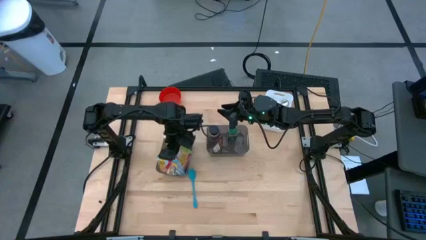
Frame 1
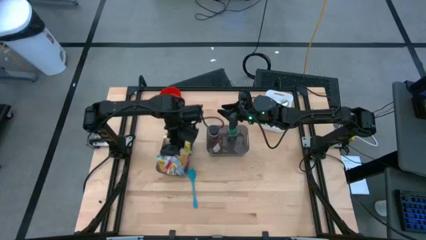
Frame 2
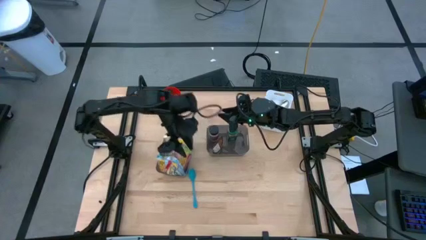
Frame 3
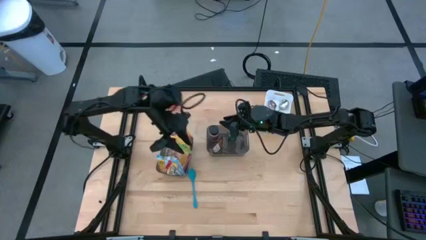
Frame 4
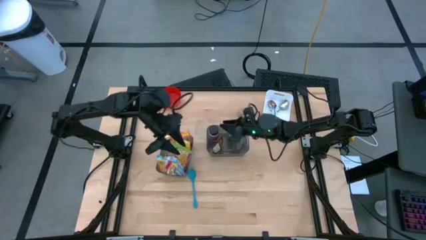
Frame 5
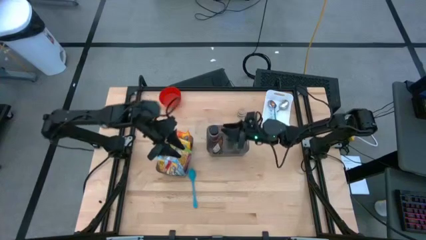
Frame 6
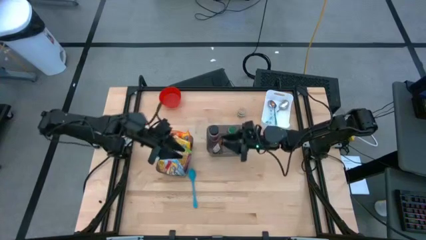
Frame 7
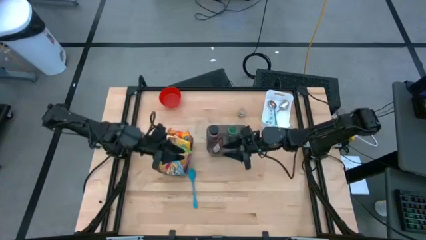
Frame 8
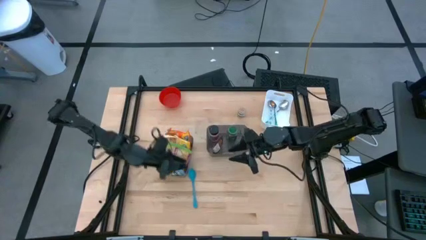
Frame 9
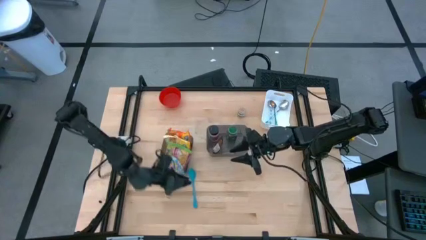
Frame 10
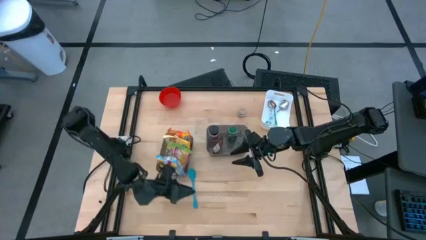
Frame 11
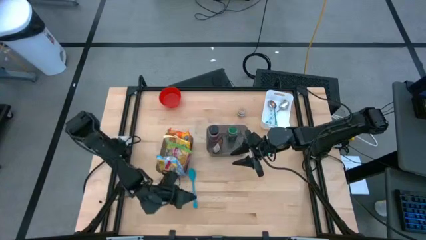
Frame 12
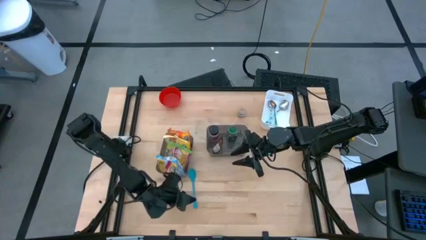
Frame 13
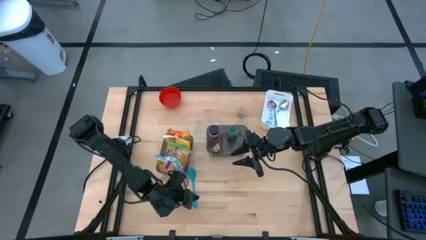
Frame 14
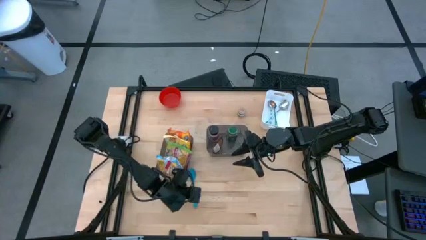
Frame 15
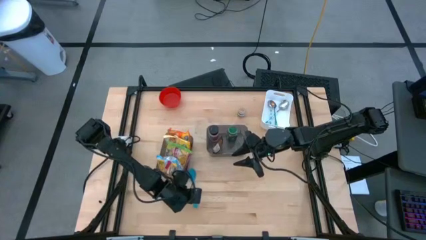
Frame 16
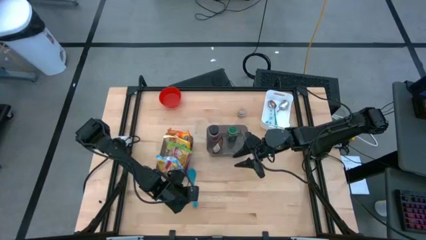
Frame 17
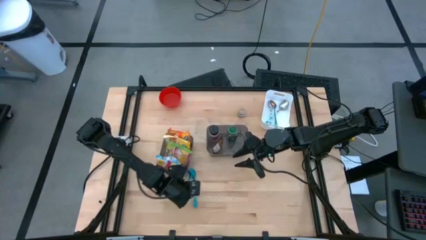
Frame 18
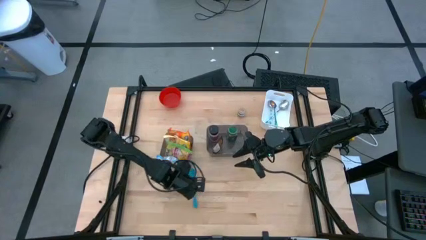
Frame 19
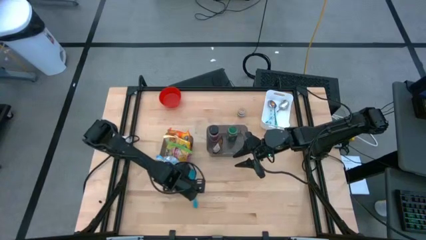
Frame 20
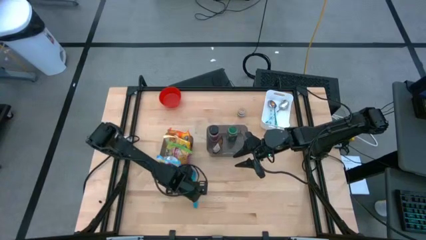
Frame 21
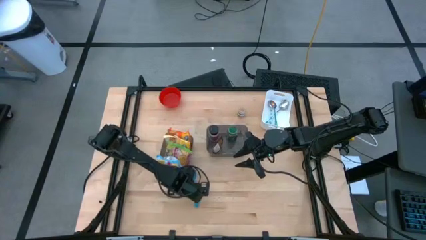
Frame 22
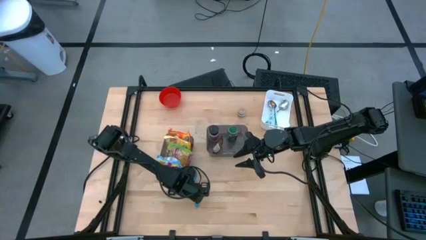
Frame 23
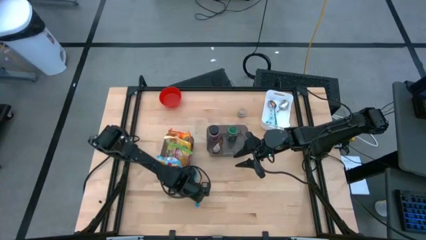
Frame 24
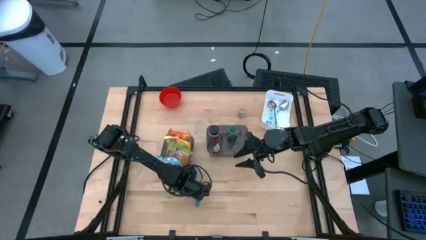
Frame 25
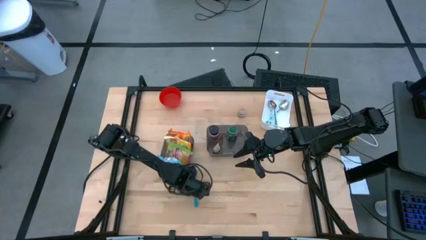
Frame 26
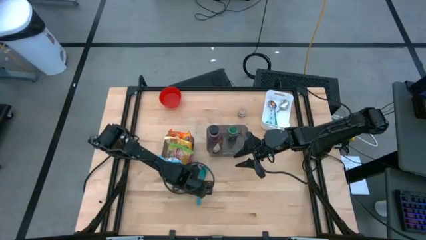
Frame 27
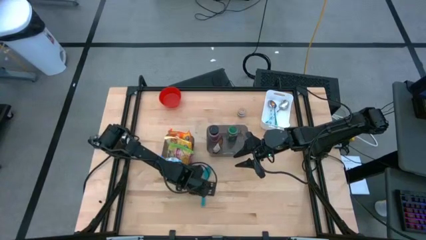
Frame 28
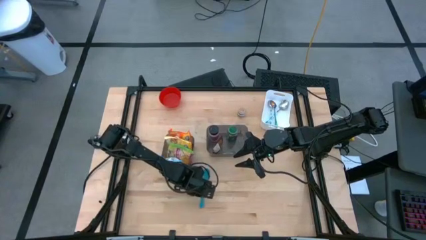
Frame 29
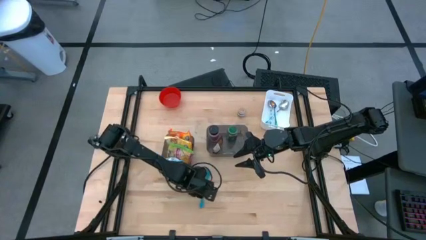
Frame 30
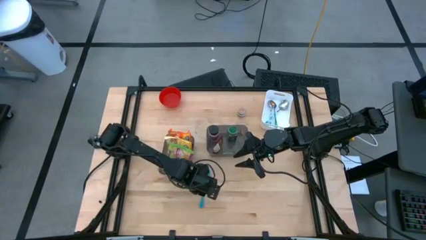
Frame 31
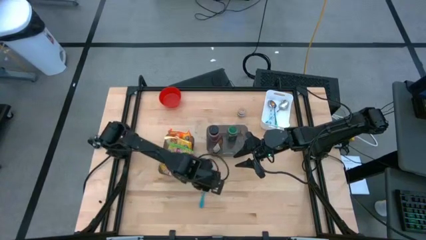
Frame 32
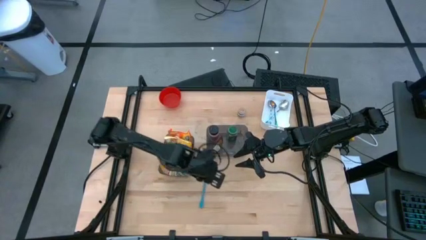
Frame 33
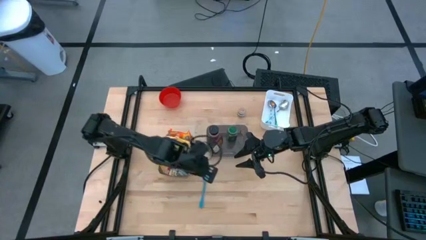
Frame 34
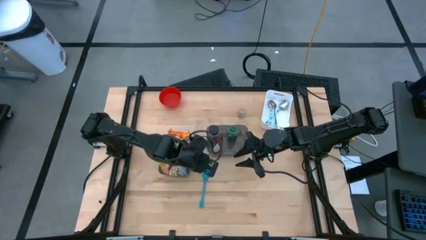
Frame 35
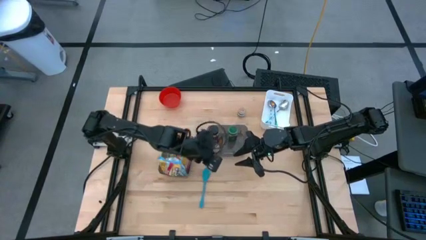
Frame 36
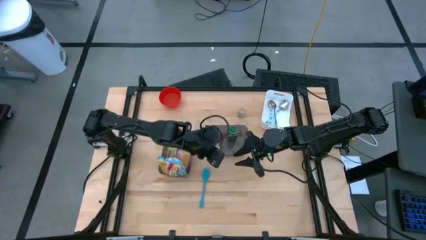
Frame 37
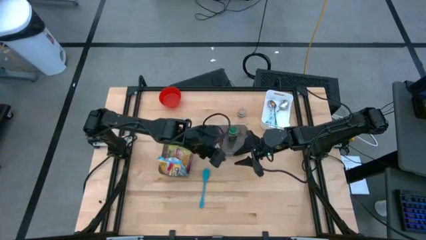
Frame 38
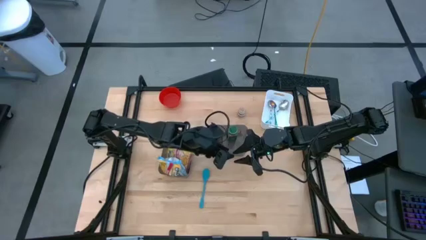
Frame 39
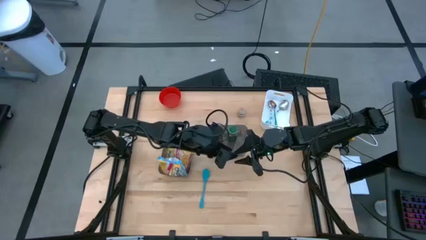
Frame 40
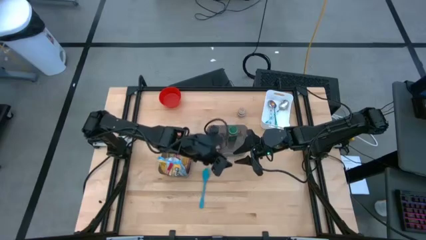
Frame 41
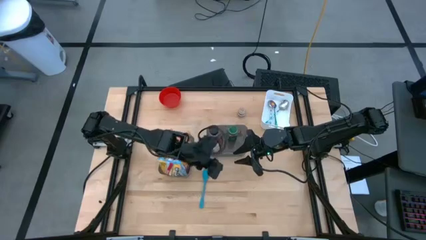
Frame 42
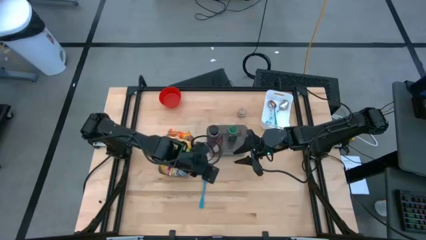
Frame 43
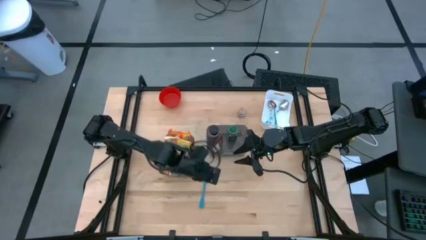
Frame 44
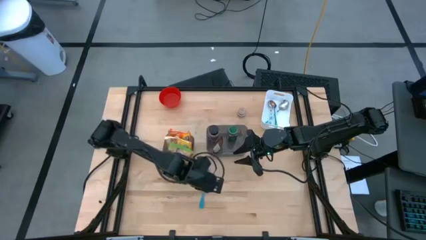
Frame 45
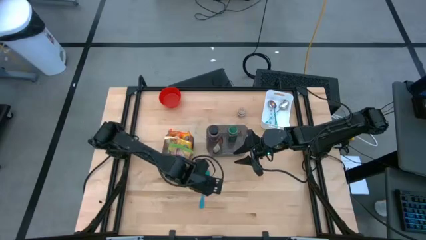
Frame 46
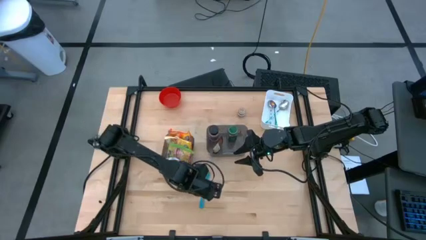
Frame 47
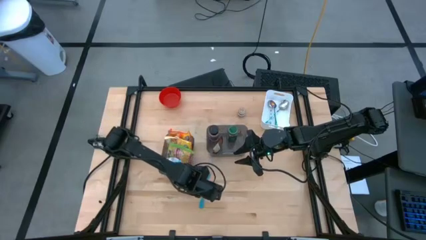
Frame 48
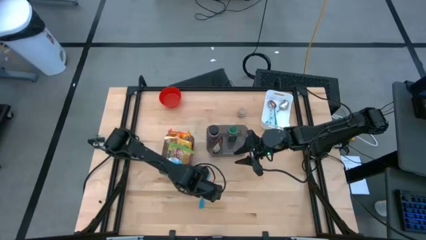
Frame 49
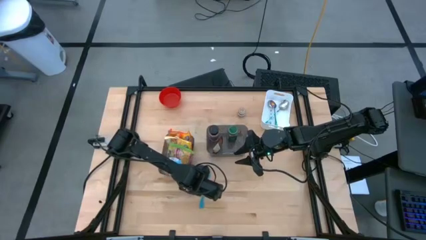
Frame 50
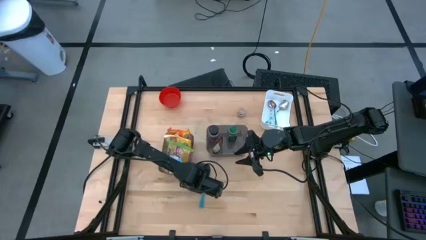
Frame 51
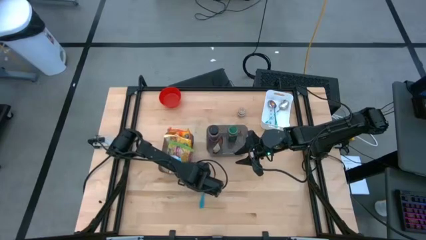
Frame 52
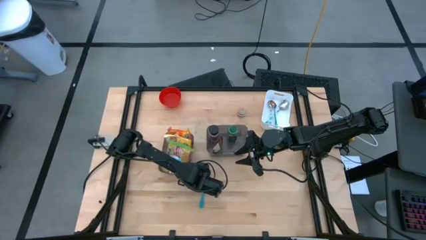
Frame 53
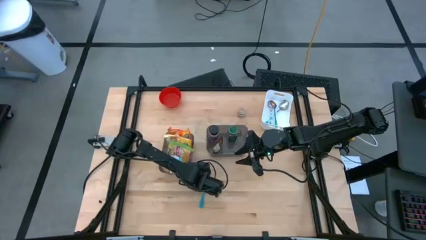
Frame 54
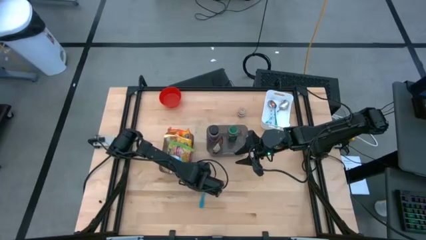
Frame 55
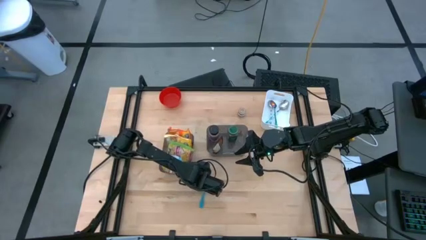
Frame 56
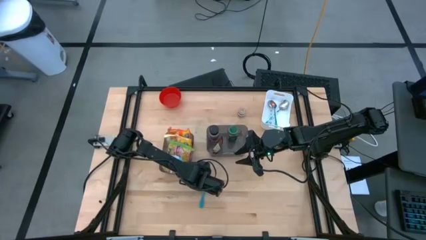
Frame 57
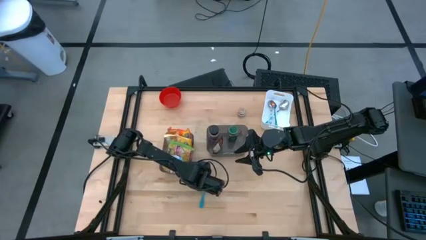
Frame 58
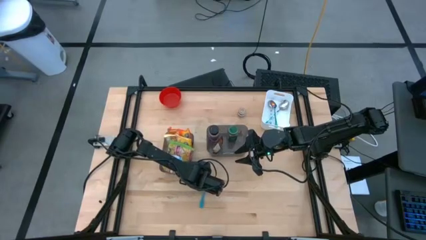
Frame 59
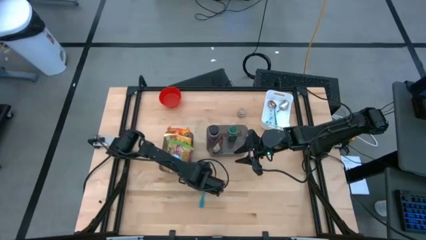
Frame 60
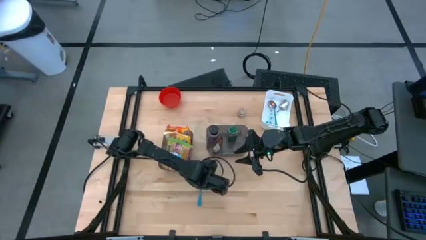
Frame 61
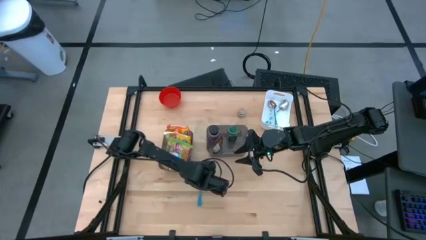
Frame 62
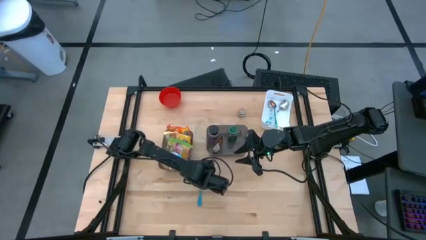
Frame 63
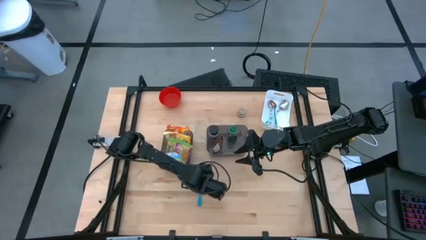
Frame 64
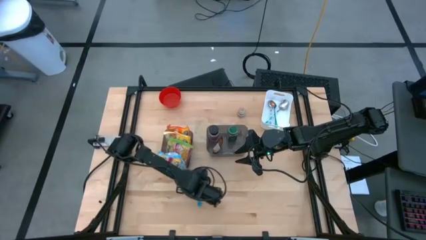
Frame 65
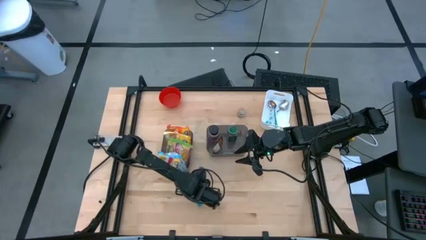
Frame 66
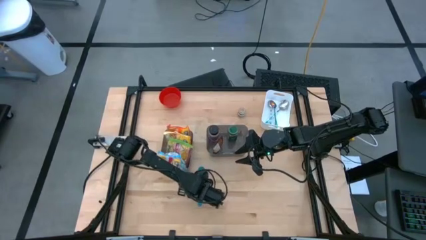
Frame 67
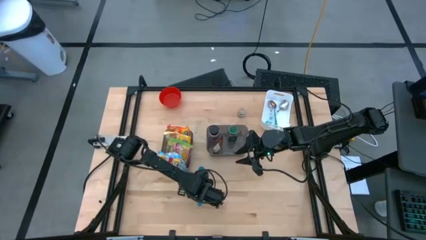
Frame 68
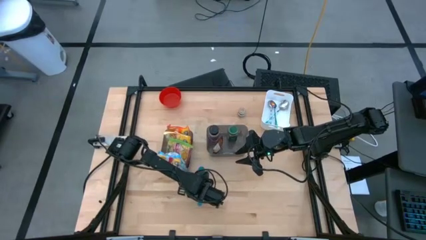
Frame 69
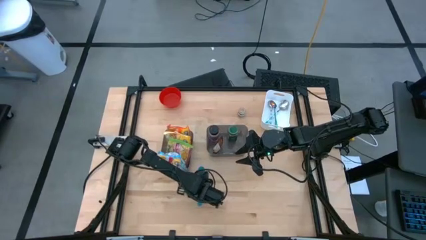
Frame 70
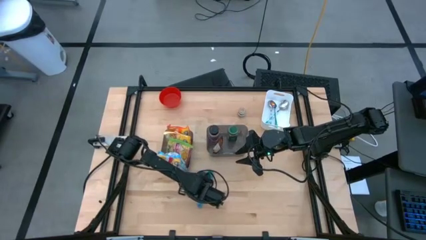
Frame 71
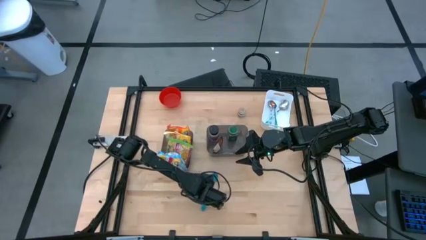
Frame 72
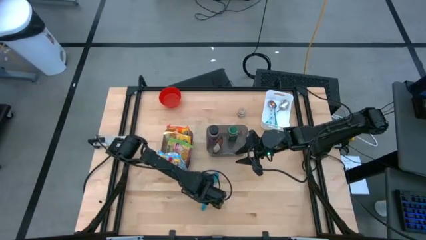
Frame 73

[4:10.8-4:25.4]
Task: Pick & Place Food Item
Put the blue baby spoon into the white bin
